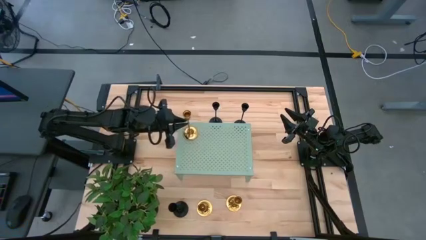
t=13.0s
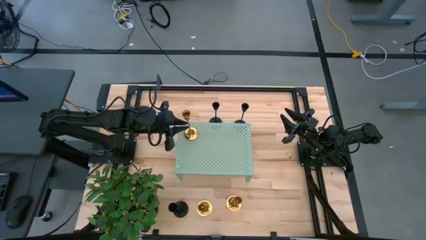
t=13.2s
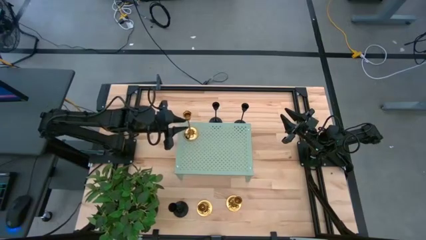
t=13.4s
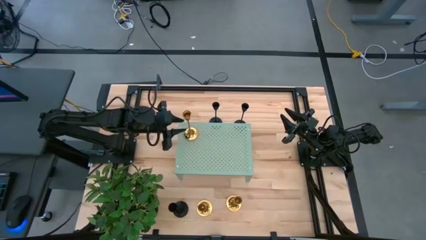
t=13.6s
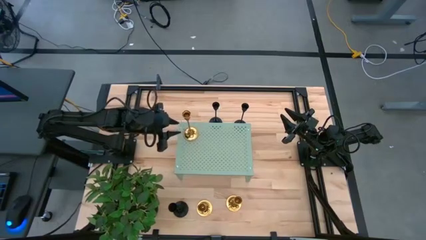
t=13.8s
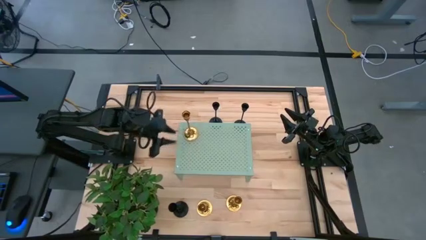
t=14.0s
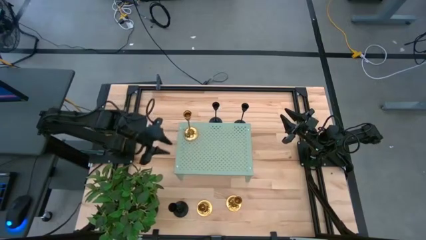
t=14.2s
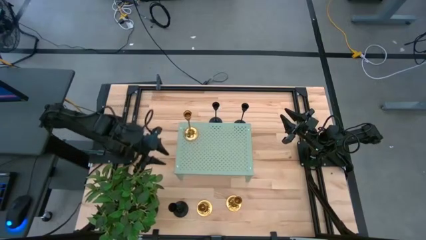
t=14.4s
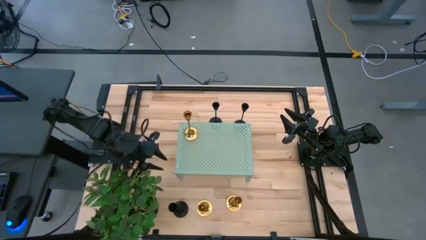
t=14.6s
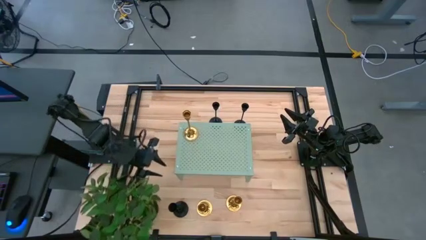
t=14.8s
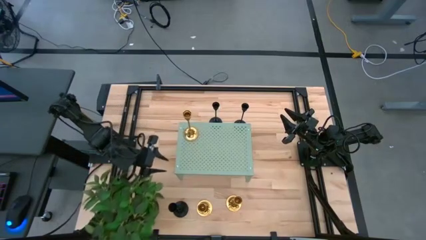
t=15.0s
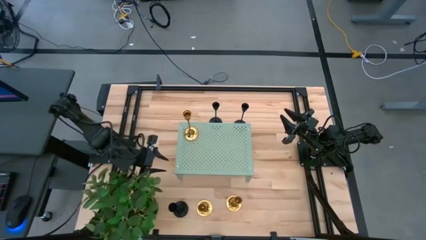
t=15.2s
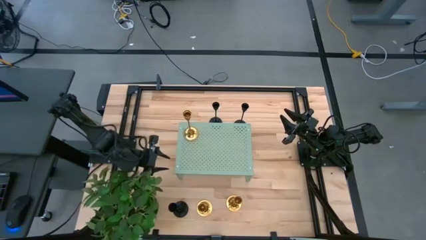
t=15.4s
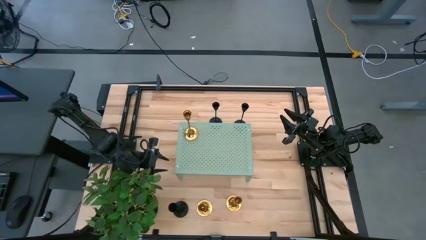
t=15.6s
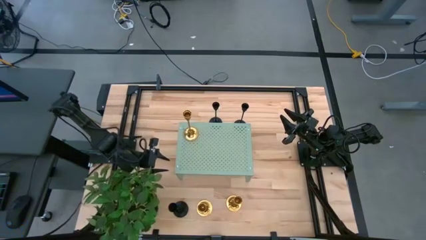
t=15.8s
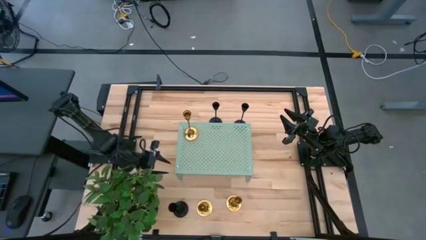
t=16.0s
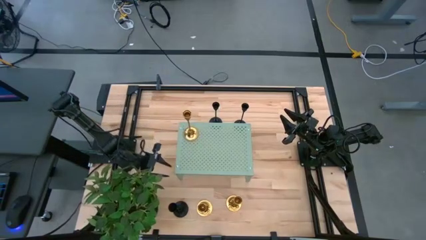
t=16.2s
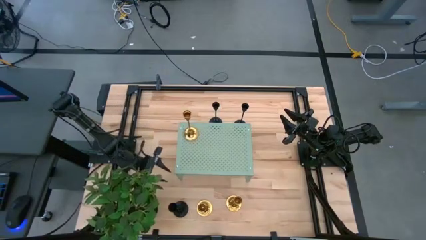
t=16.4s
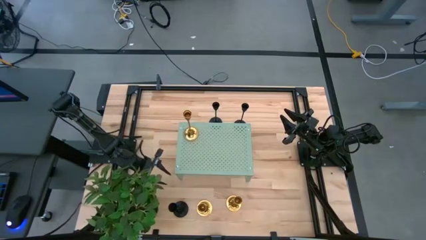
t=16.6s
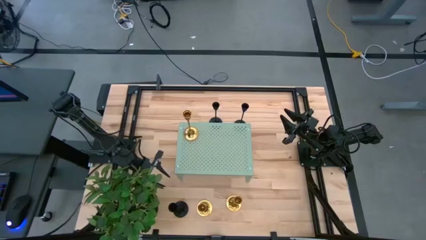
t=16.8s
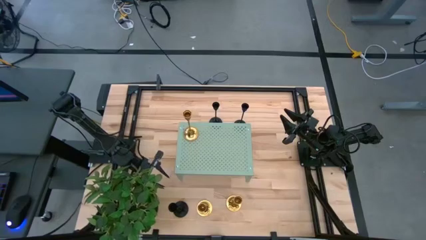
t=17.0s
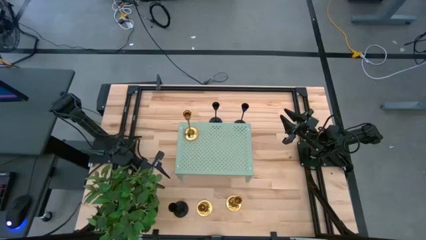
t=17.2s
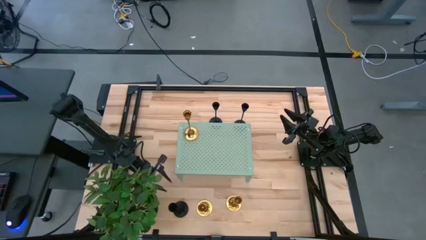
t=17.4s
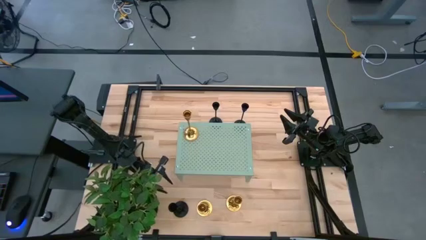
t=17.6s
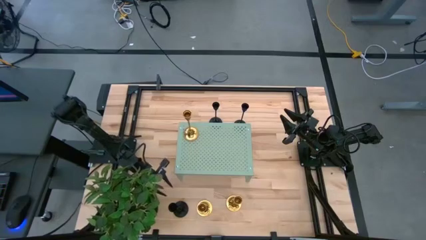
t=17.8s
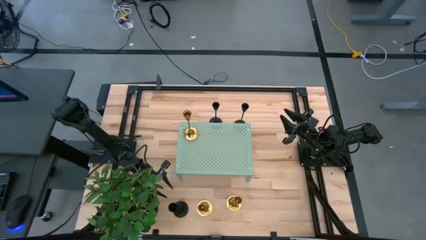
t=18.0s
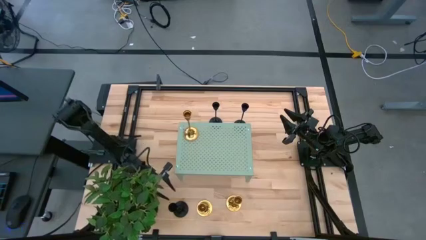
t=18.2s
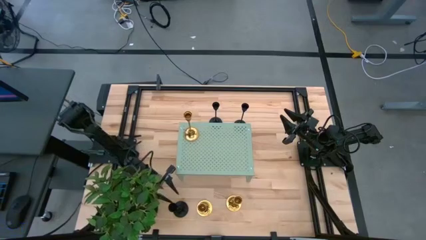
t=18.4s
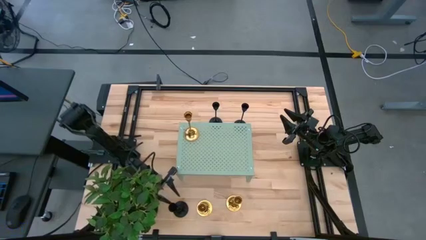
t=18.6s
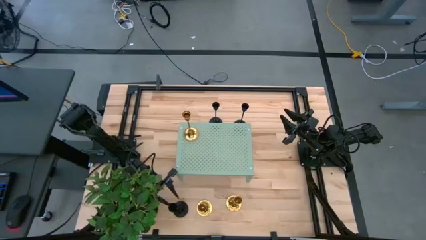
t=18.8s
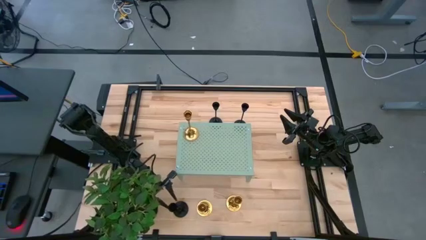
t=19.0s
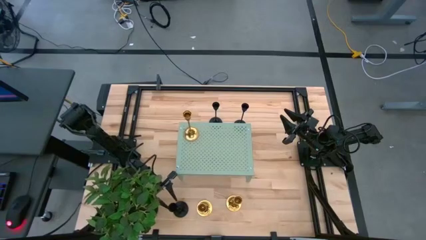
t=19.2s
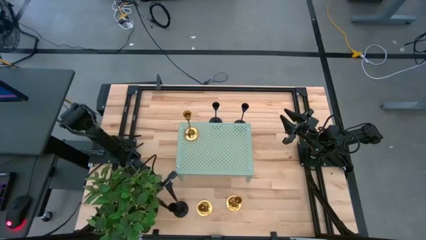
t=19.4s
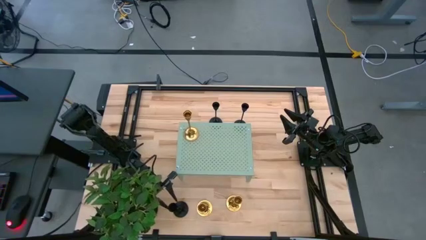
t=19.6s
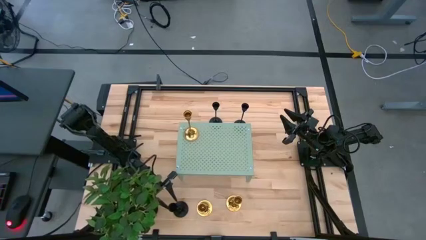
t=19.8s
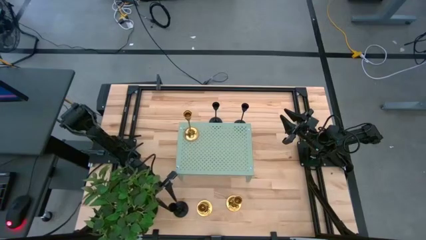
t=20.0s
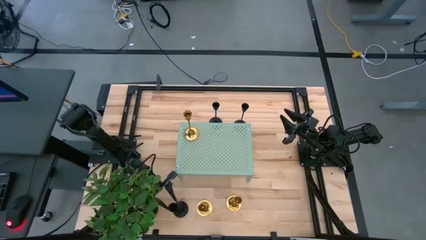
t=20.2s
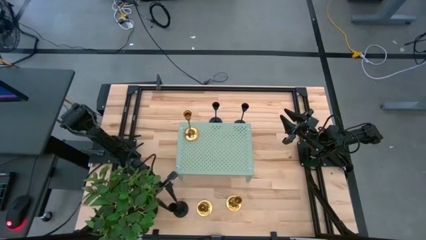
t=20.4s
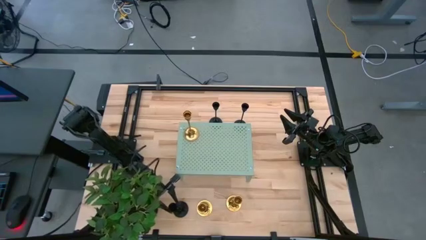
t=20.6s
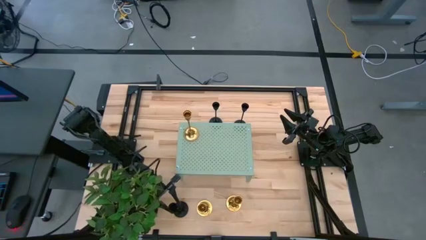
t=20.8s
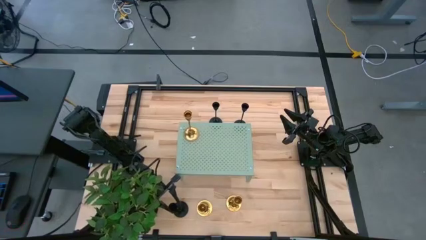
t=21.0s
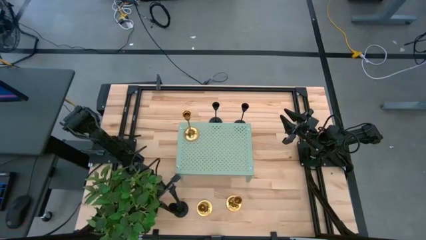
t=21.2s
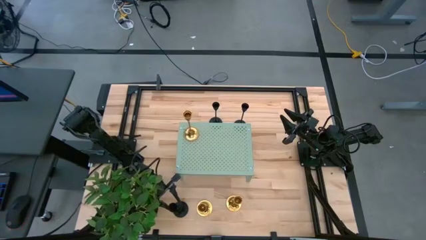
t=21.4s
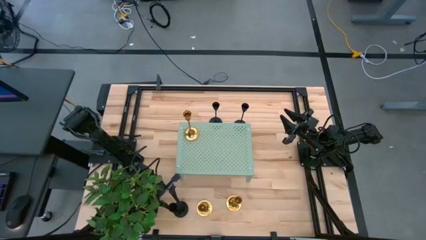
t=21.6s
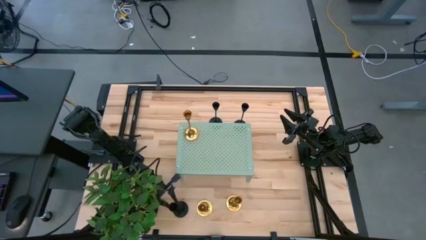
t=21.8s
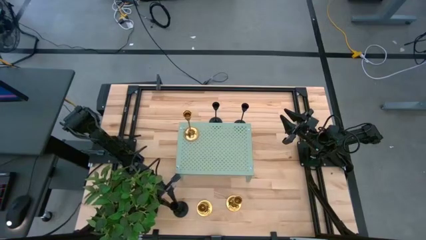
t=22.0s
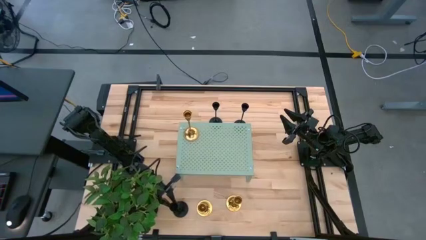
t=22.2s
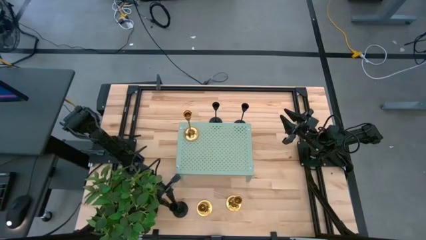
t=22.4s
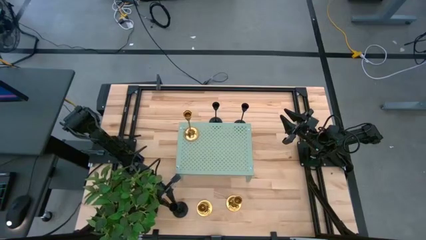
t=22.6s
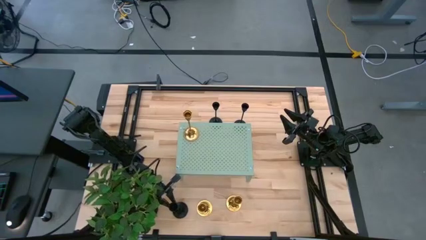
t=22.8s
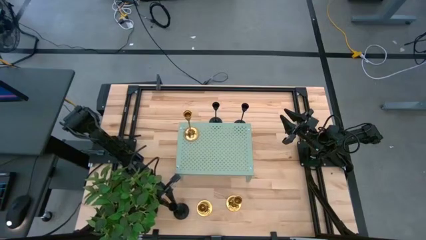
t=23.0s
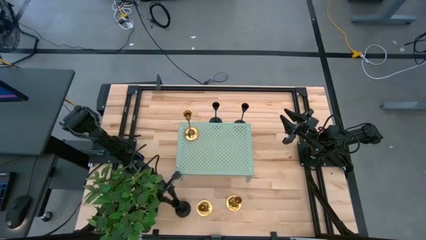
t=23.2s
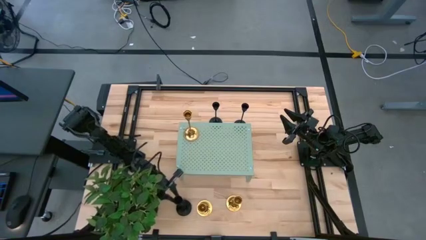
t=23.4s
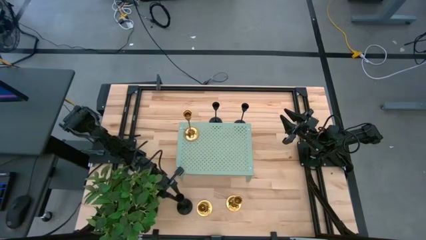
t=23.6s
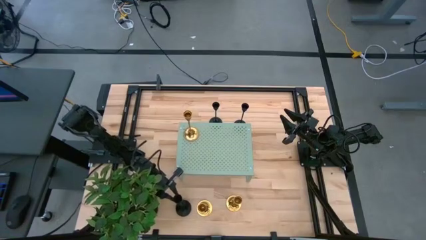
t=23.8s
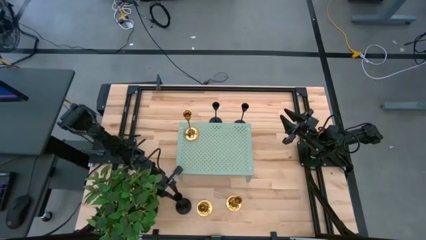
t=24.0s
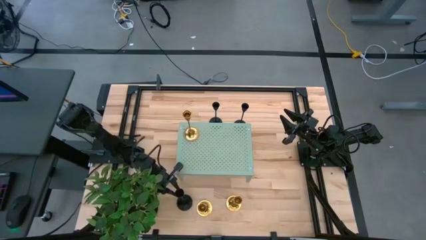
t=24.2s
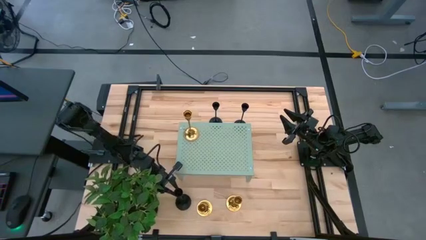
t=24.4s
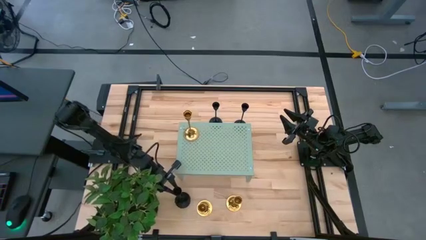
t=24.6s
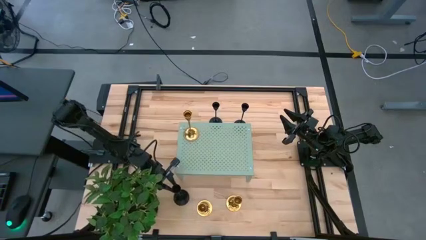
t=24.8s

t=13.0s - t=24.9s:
Task: Pick & Place candle stick holders
Put the bottom left black candle holder on the shelf
